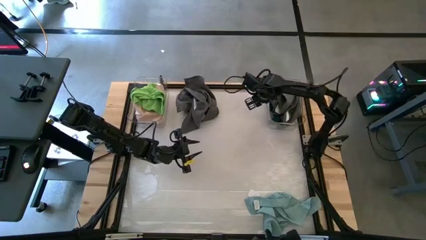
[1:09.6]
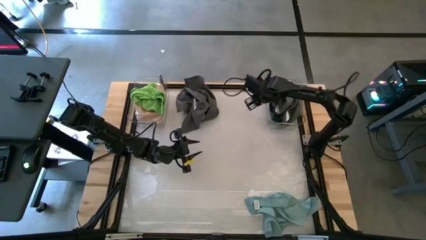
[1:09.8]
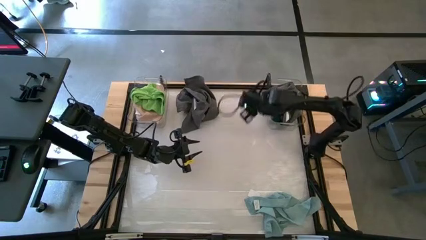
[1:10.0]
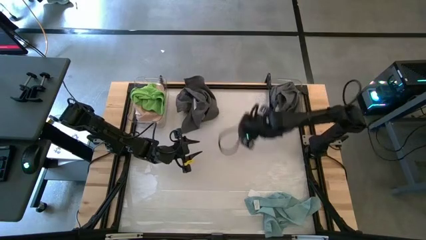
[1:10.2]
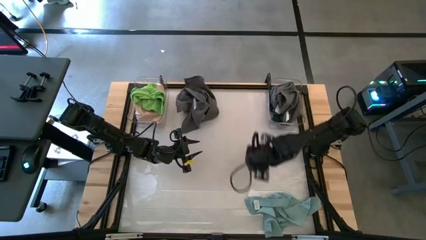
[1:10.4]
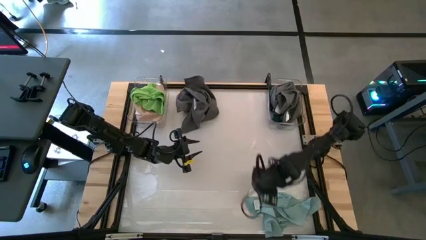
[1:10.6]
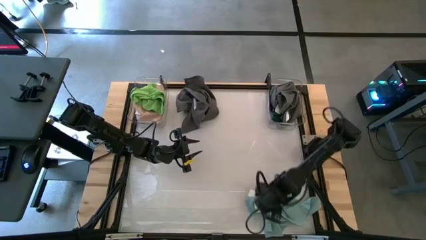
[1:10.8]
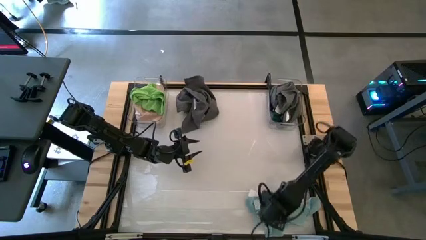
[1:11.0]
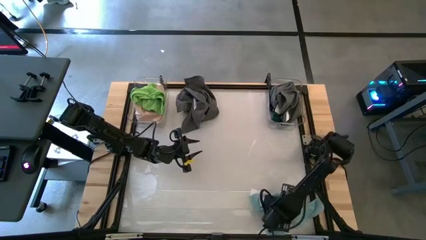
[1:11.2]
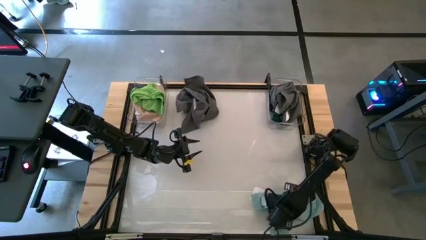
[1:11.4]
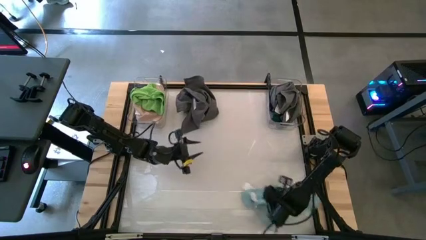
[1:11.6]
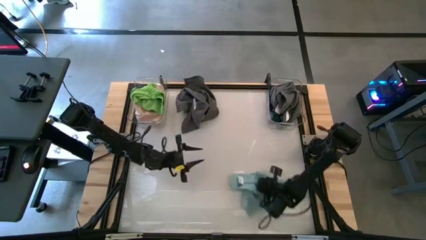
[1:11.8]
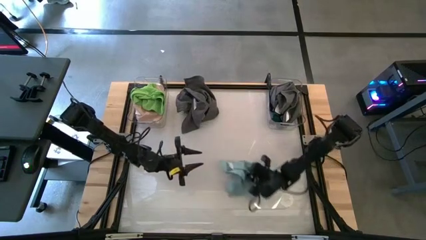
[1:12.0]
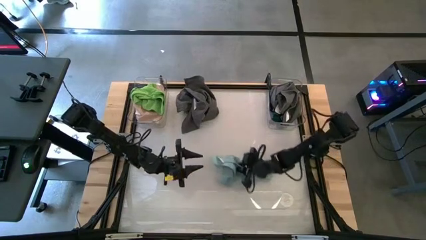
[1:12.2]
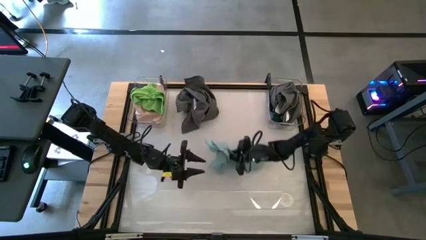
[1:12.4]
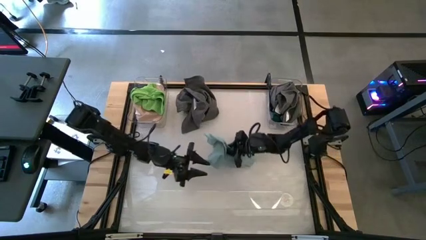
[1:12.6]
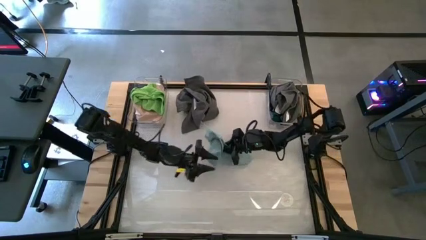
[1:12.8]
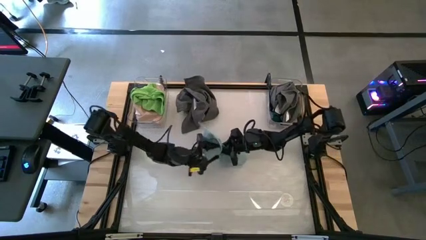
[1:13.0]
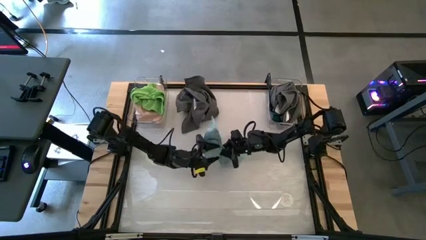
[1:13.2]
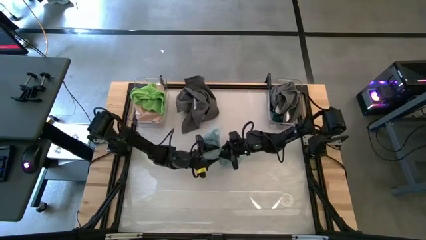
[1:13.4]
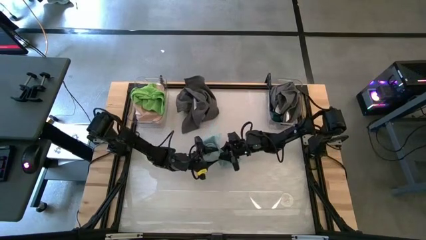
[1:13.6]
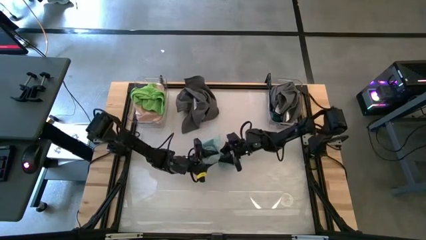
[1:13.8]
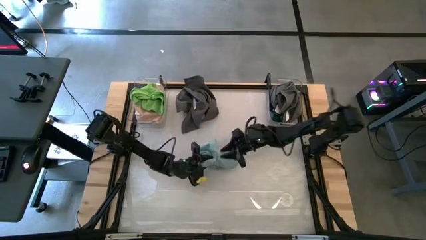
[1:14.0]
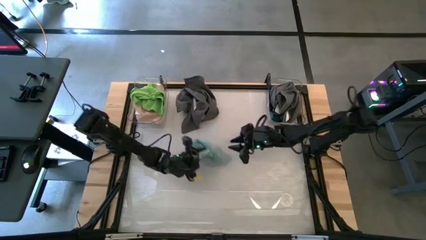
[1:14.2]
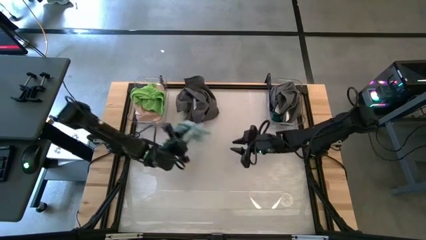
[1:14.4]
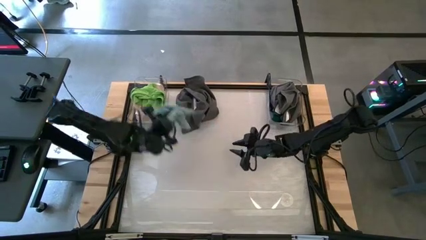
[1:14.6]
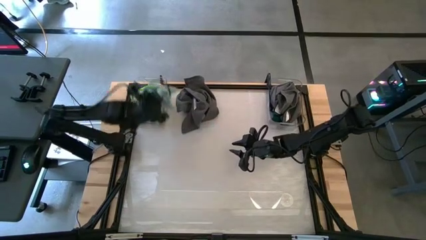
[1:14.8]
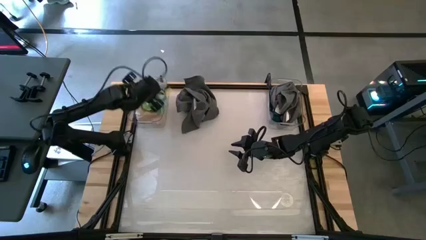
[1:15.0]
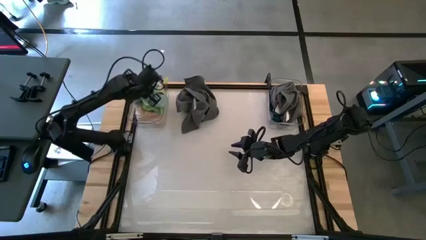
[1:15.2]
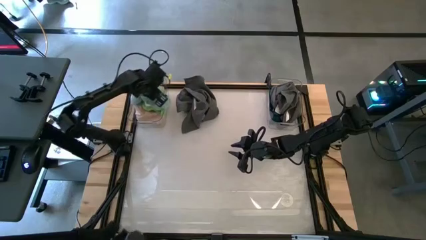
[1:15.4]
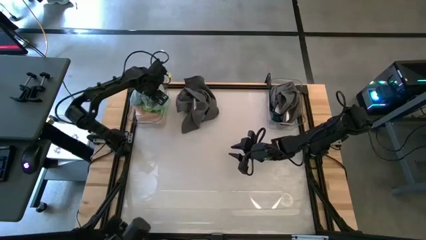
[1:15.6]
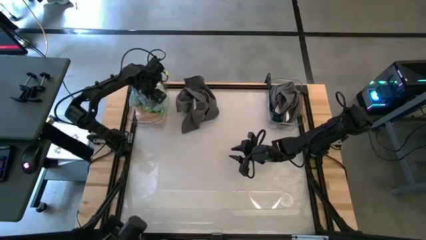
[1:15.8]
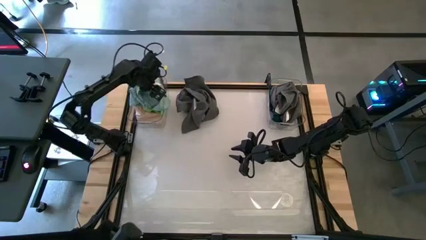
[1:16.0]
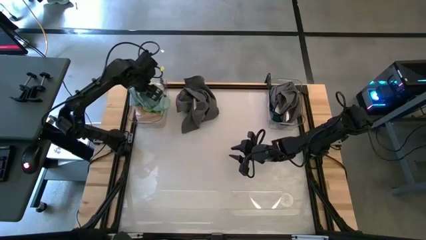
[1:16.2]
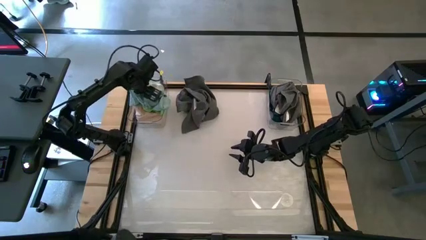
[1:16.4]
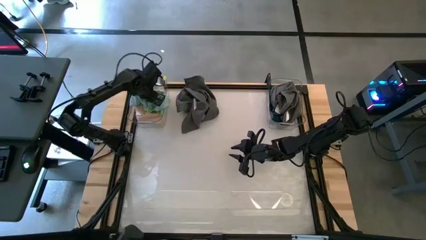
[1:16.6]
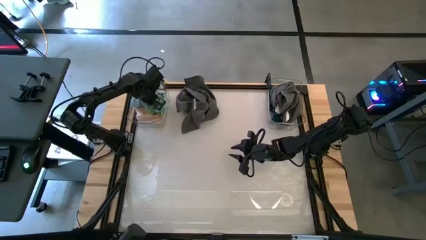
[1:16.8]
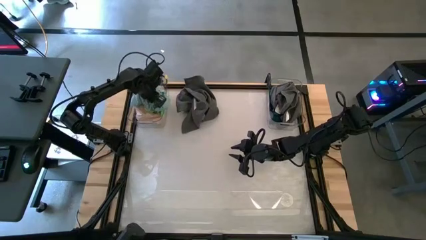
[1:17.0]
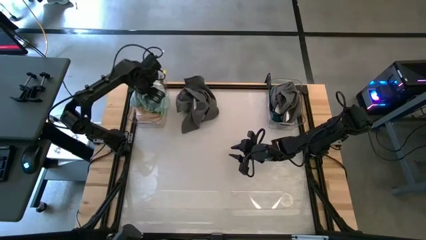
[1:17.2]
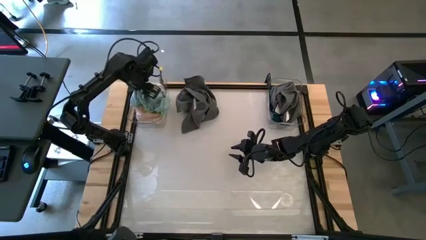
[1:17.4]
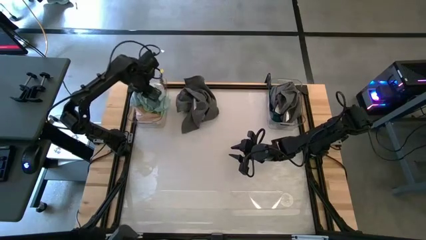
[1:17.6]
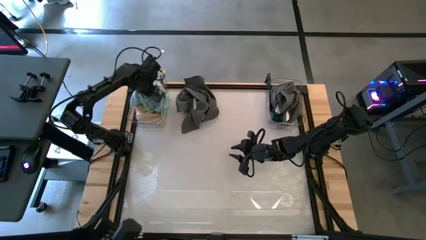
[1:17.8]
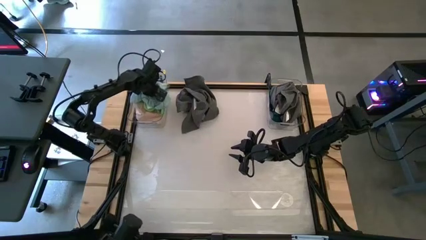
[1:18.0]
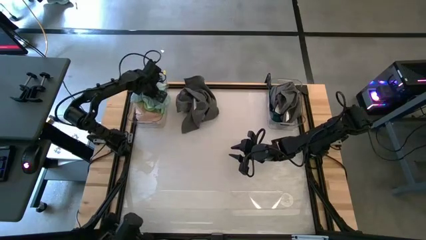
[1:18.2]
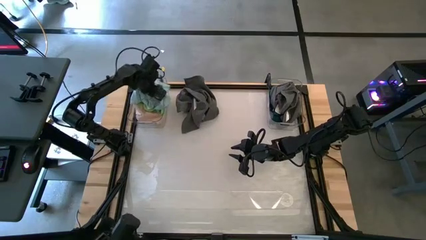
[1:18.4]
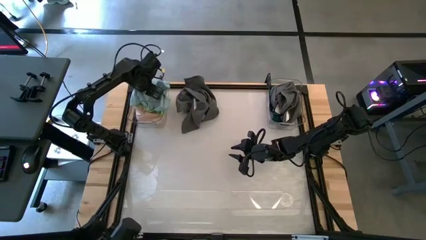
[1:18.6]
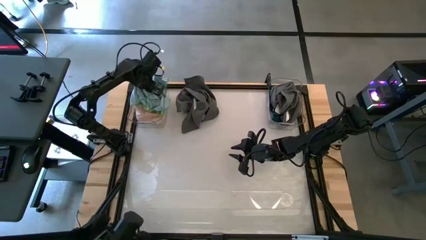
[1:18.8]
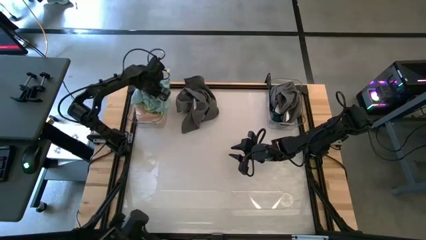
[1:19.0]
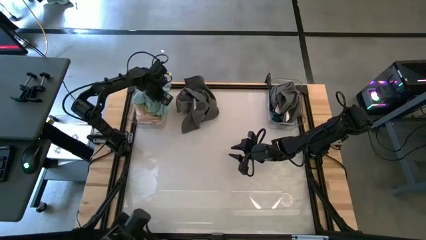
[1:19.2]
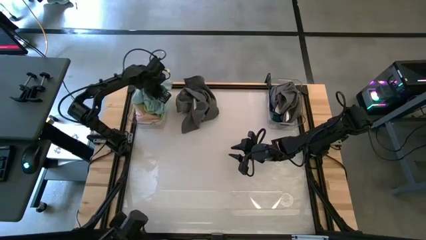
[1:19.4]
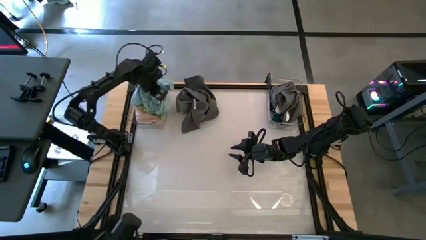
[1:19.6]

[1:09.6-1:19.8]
Task: Sort towels by color in basket
Put the light blue towel into the left bin

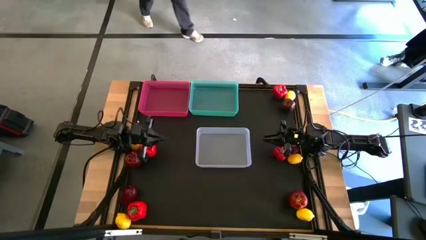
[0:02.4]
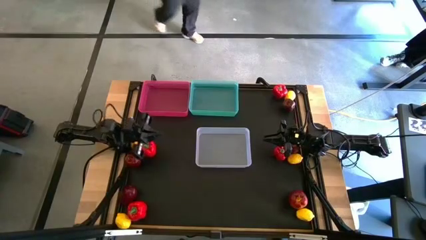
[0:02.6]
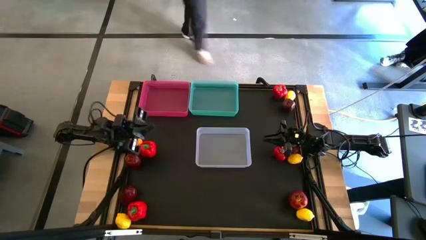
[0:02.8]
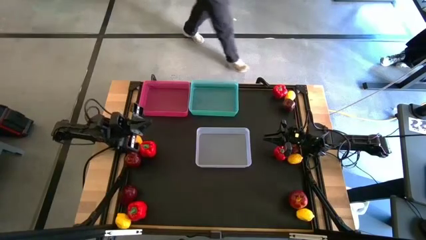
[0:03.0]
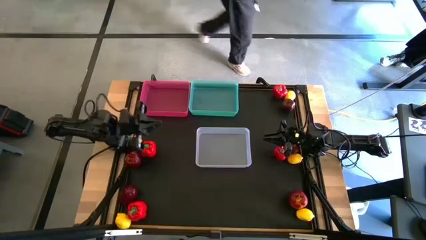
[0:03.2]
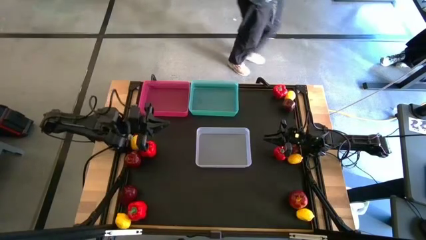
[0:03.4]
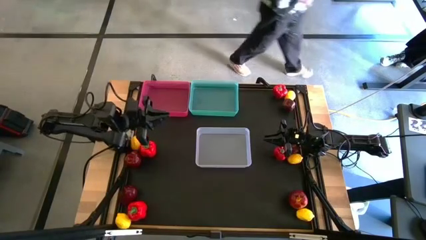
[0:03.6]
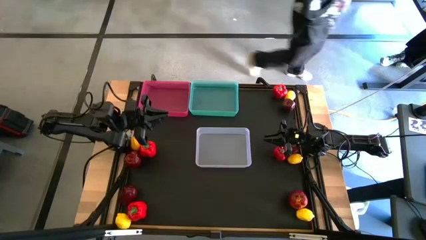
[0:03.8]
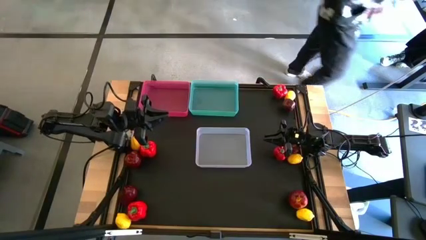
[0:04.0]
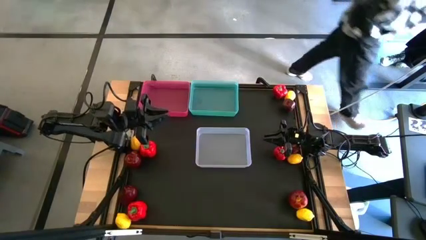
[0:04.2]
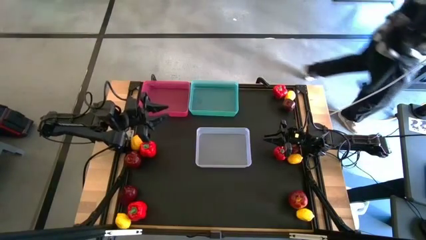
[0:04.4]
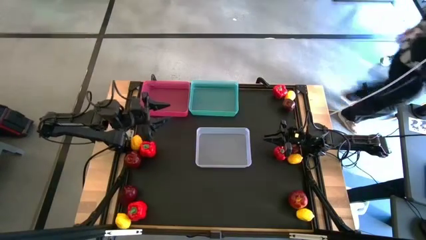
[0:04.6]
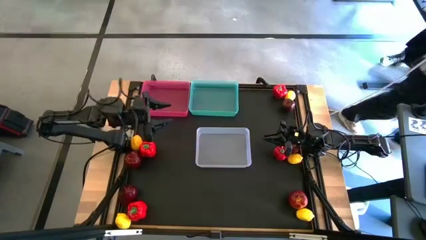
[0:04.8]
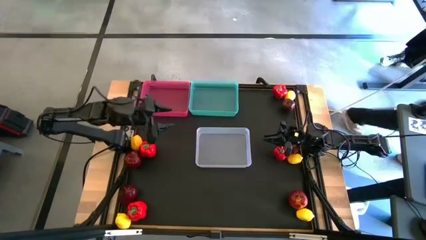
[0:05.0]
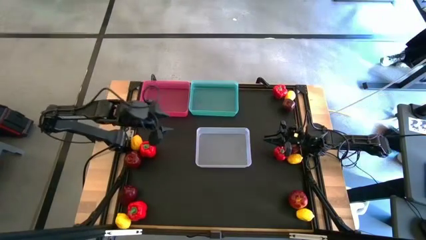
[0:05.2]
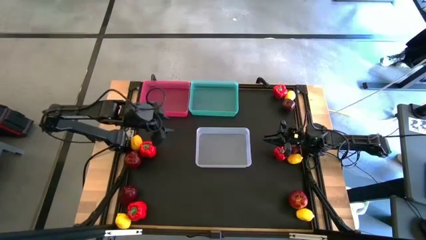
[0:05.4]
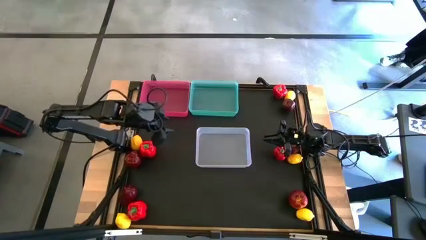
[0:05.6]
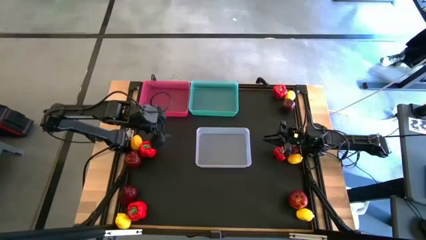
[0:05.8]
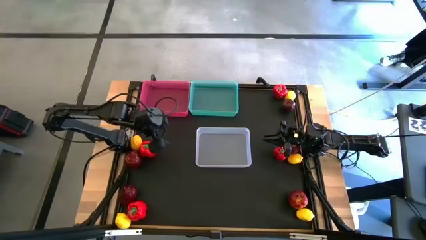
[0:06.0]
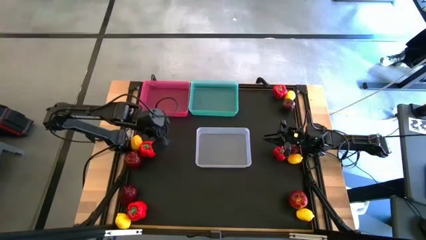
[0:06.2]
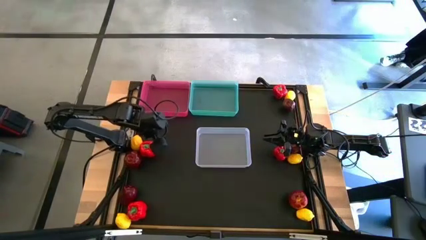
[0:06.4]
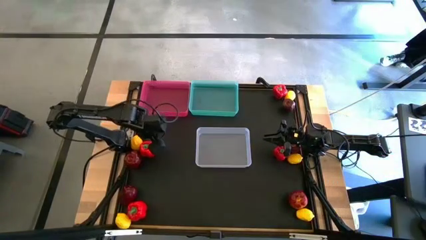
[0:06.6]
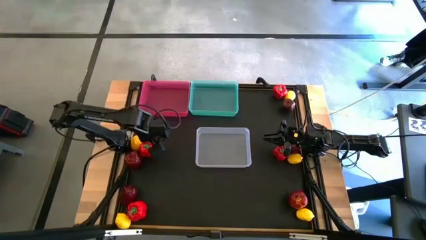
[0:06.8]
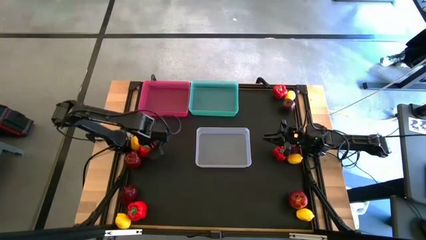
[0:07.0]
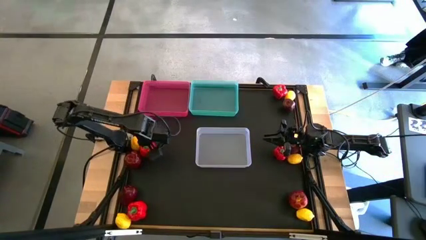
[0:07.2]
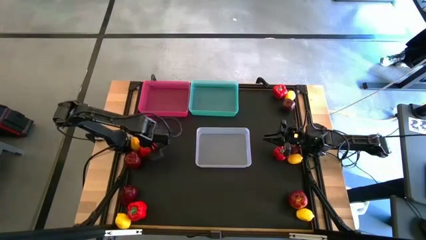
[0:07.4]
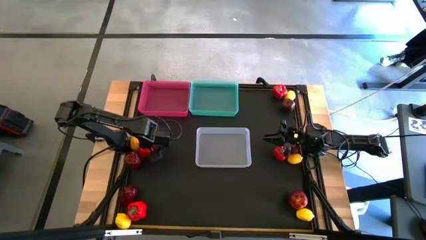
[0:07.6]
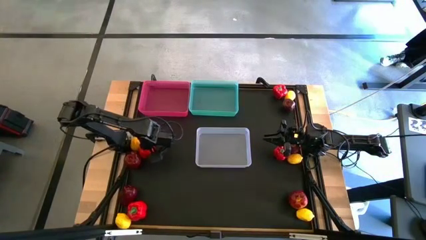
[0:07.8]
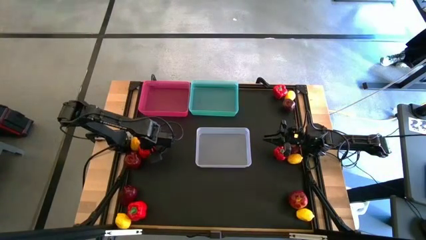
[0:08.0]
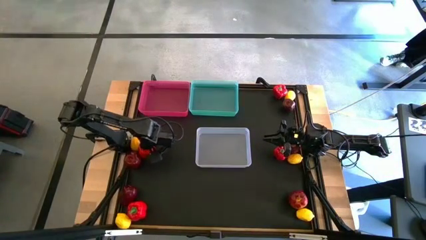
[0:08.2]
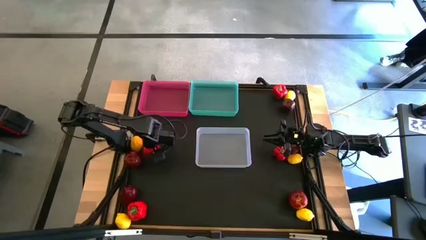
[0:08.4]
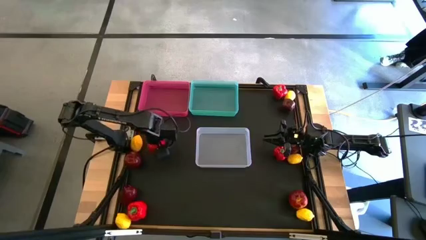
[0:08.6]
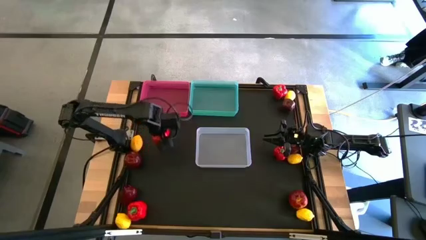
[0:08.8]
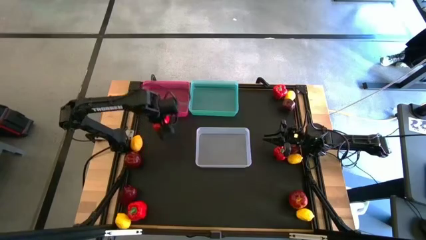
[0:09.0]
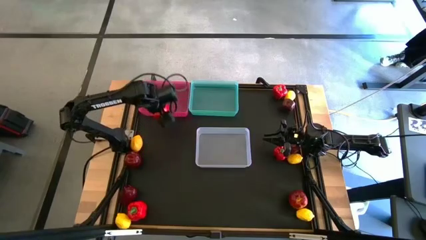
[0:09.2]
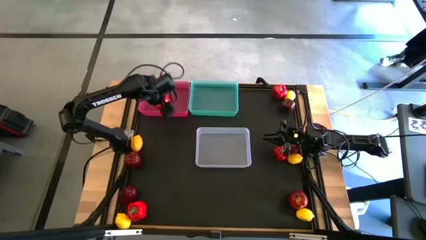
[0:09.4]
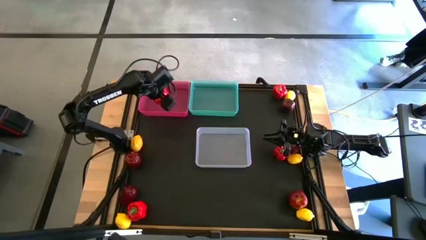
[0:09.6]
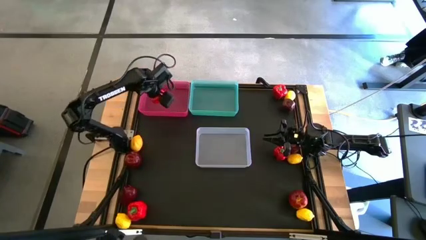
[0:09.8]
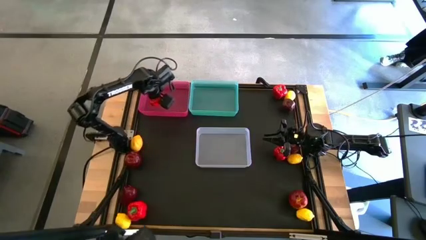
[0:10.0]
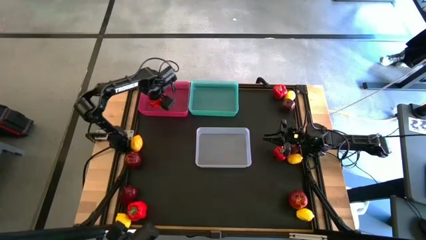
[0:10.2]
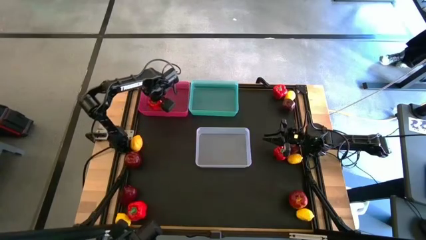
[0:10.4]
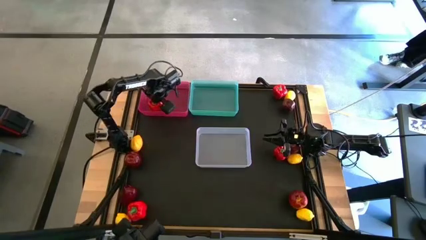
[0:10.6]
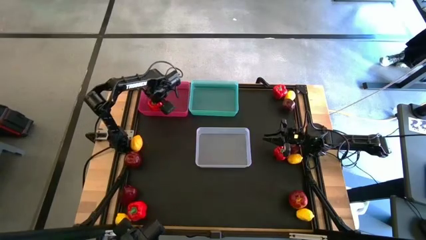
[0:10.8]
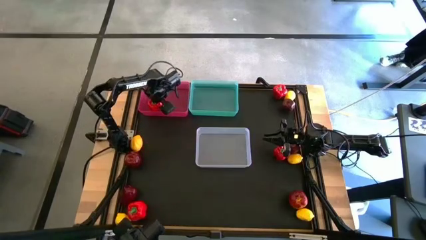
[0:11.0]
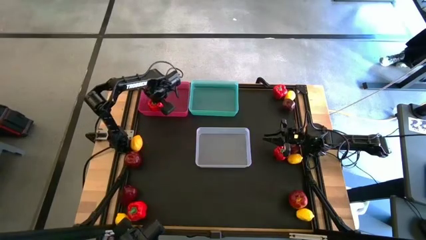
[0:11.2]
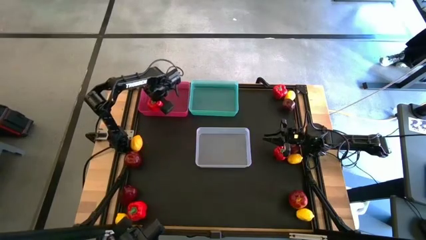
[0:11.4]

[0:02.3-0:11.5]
Task: Sort produce into baskets
Put the red bell pepper into the red bin
